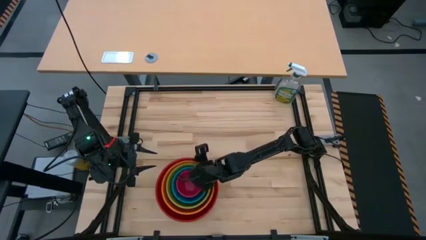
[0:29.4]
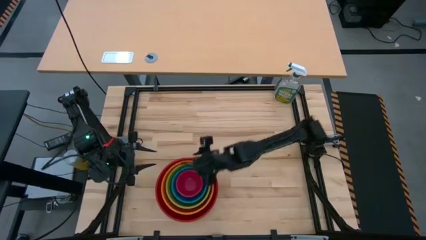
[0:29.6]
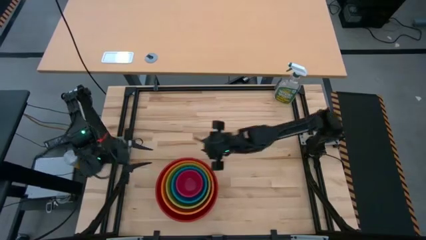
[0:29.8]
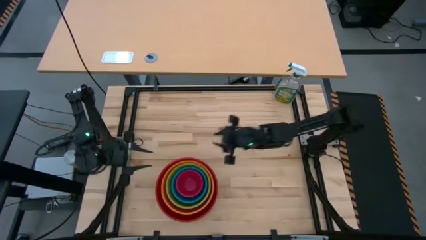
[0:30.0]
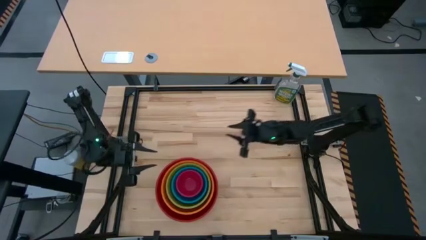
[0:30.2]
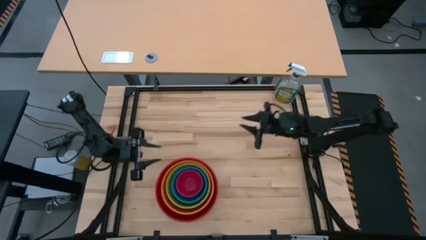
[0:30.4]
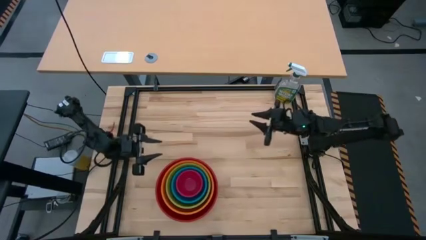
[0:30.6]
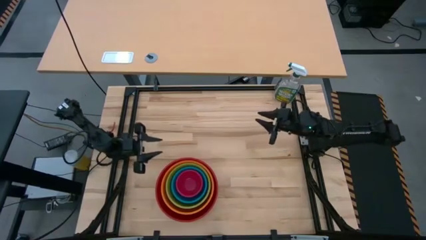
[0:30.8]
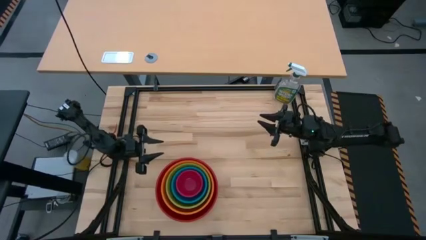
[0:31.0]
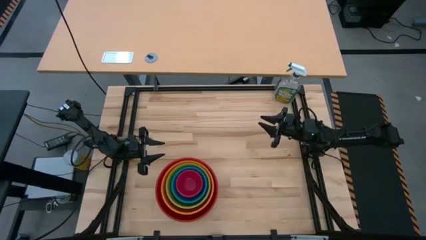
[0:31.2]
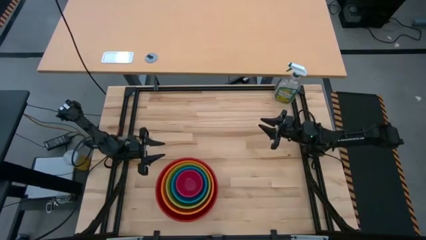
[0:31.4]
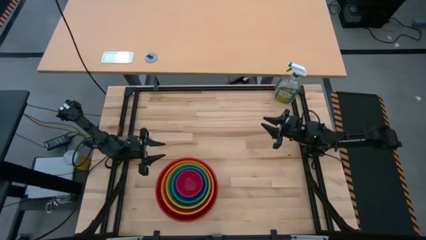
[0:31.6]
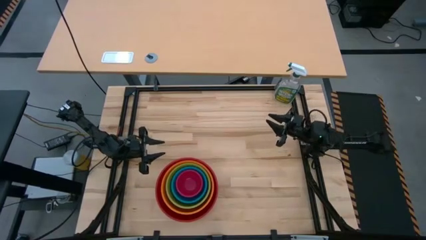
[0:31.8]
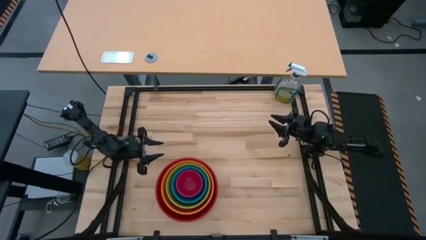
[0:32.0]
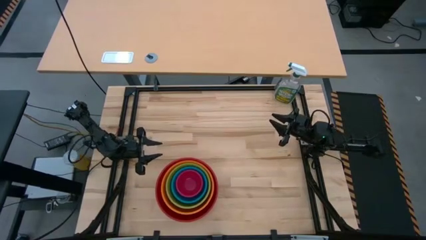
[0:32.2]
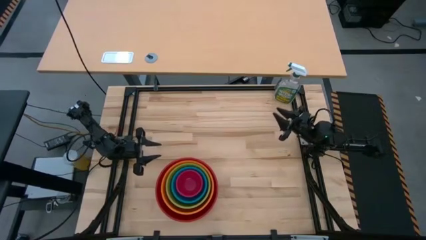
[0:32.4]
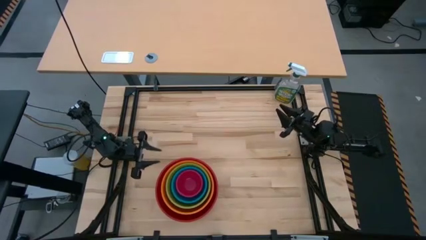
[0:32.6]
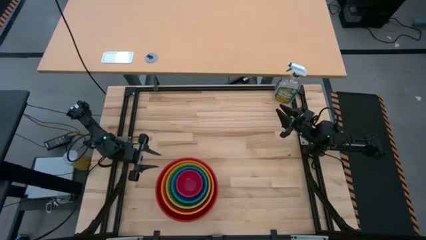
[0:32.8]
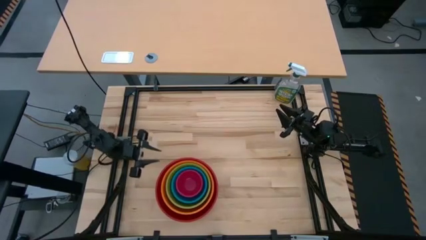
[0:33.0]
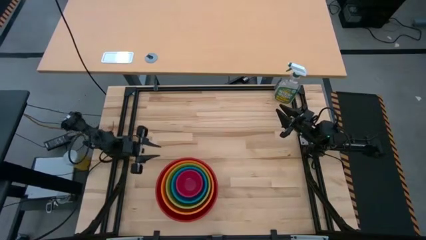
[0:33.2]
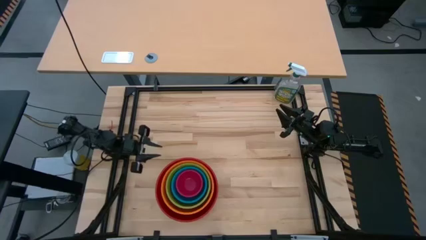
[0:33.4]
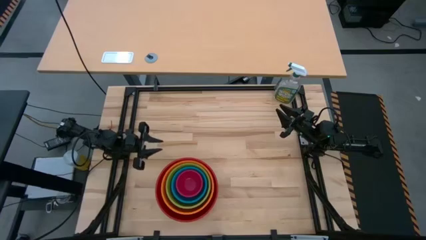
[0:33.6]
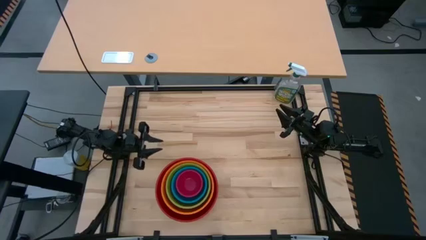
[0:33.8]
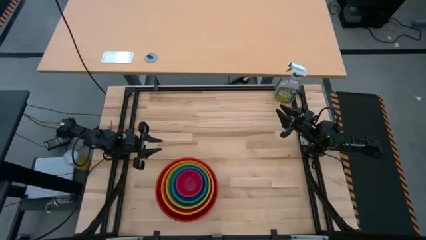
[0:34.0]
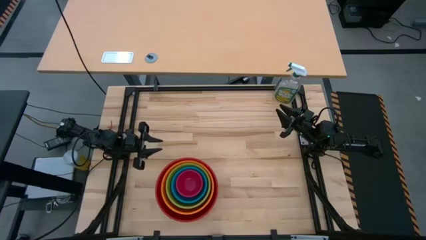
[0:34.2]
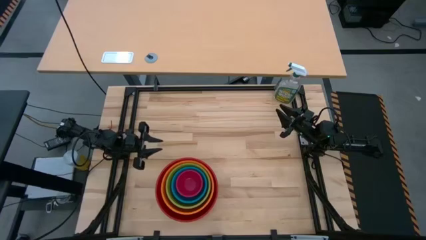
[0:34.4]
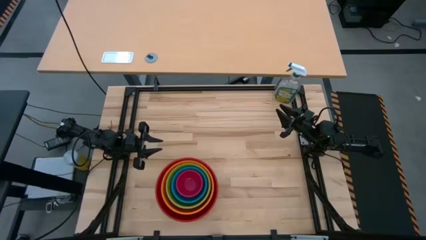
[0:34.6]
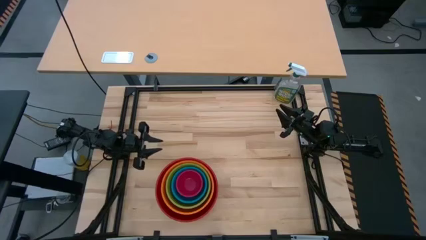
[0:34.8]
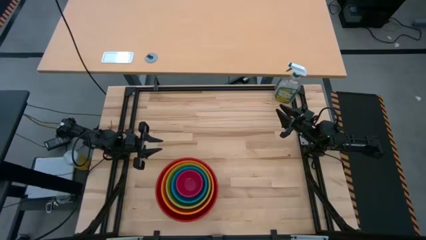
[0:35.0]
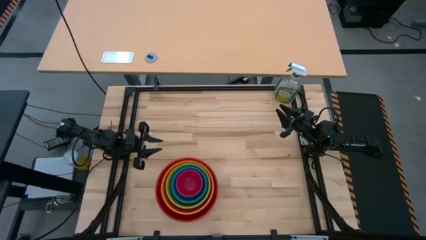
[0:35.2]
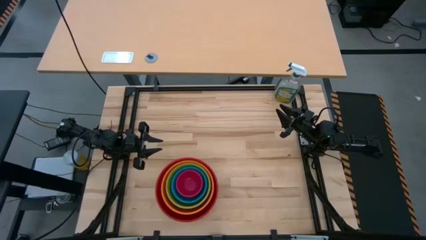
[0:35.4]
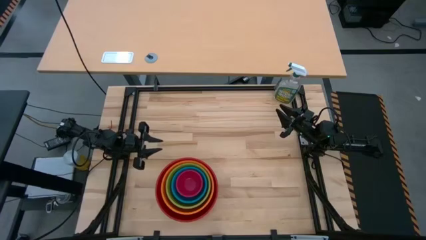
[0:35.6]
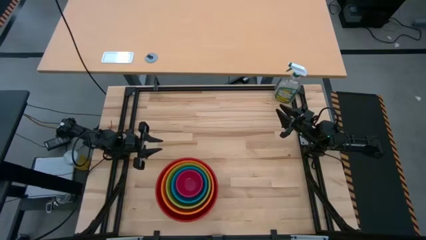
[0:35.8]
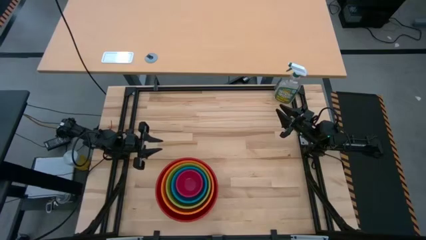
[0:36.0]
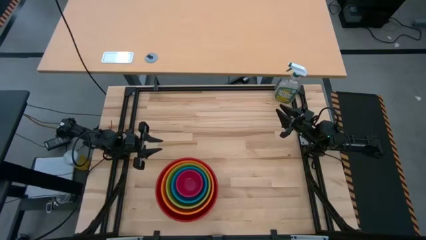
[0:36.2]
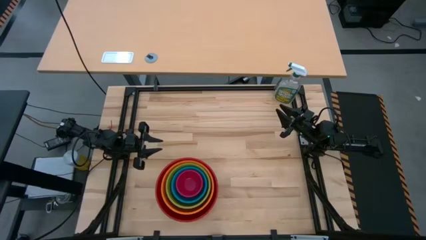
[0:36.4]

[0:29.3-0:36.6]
Return to Home Position
